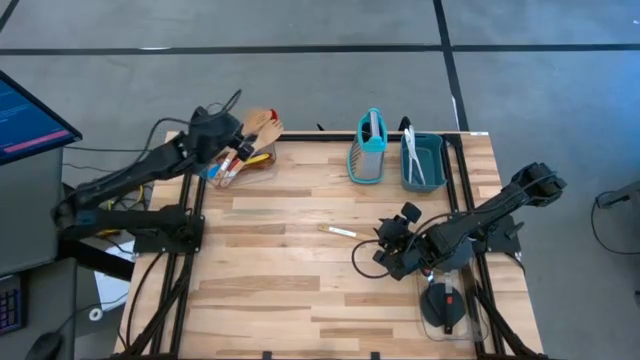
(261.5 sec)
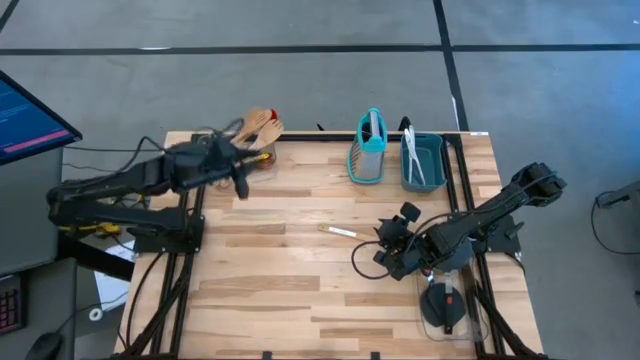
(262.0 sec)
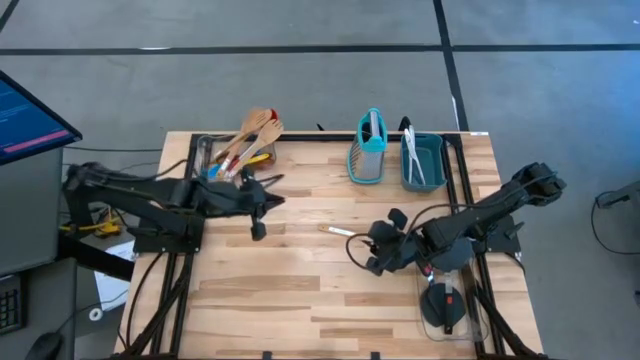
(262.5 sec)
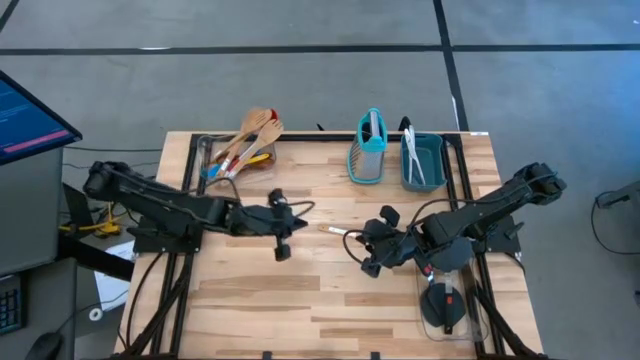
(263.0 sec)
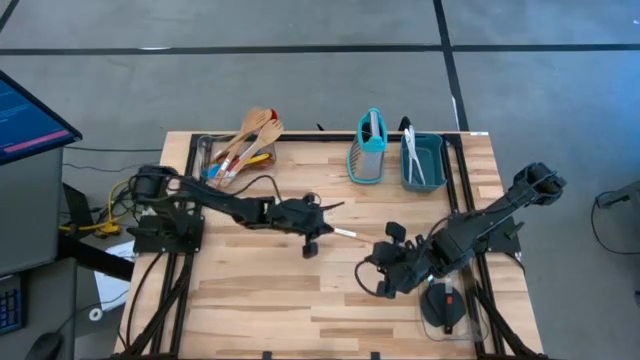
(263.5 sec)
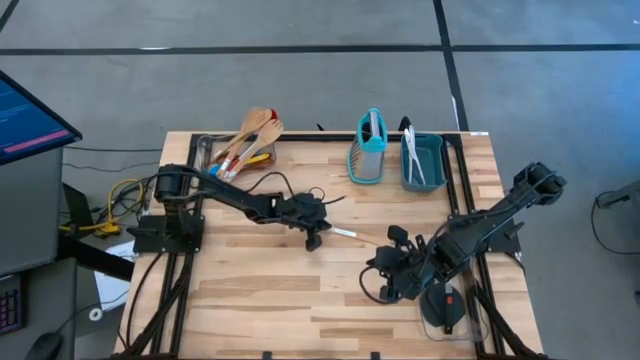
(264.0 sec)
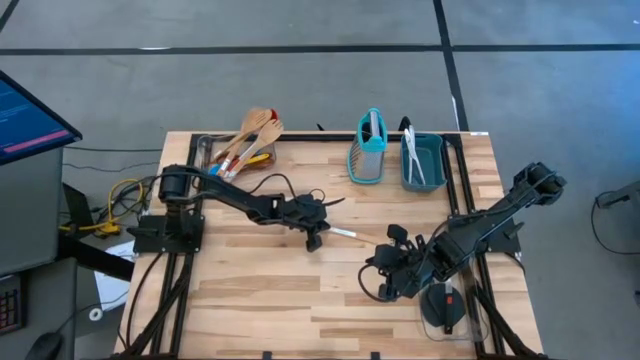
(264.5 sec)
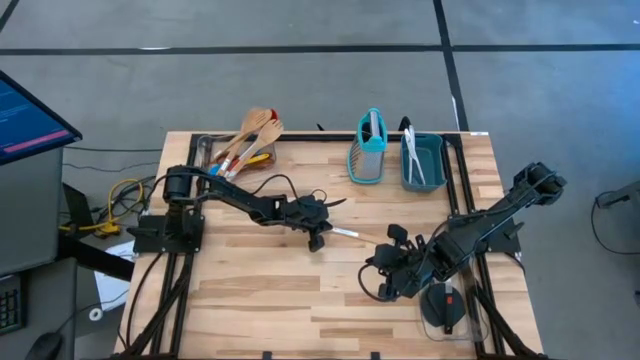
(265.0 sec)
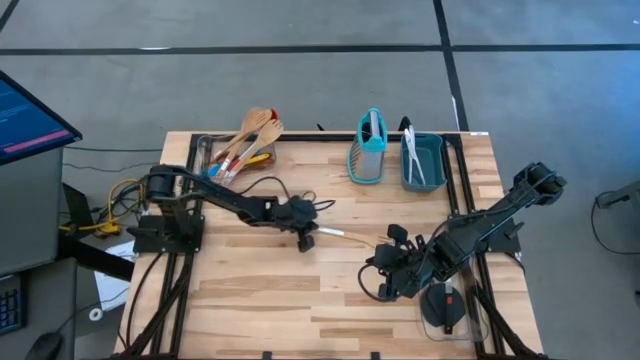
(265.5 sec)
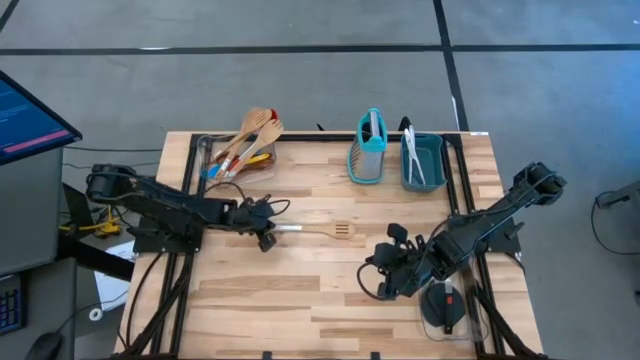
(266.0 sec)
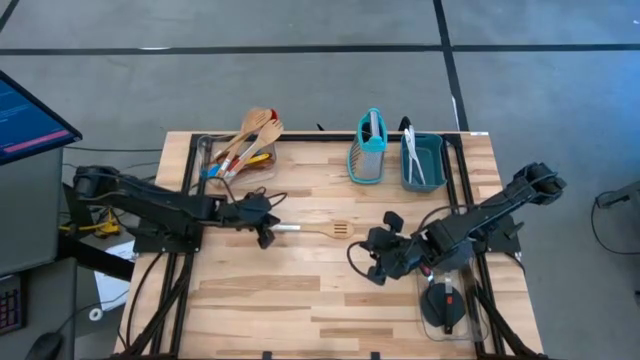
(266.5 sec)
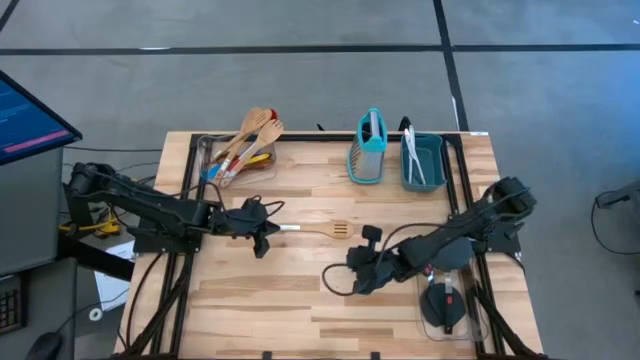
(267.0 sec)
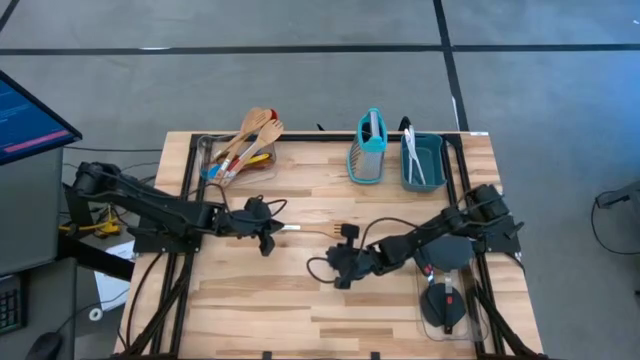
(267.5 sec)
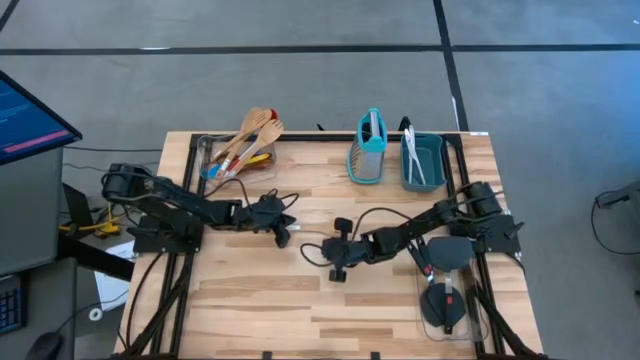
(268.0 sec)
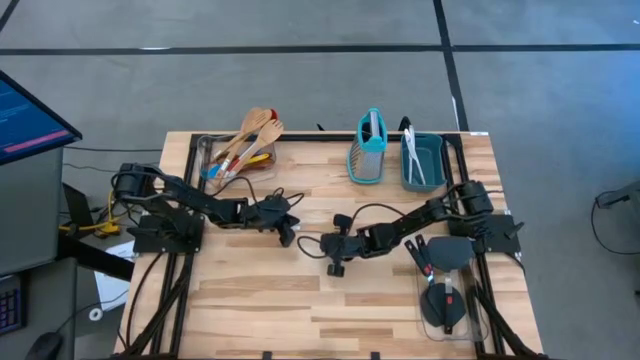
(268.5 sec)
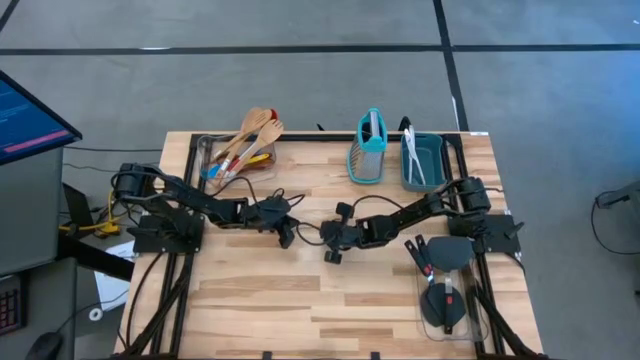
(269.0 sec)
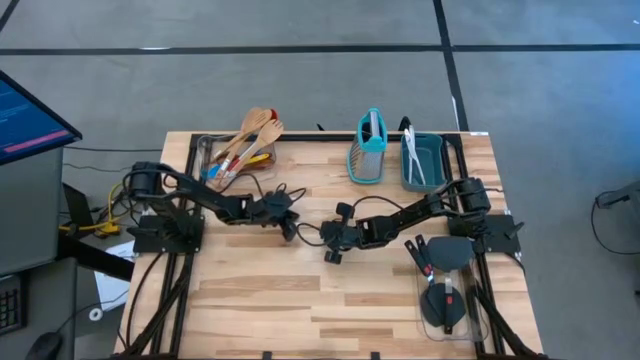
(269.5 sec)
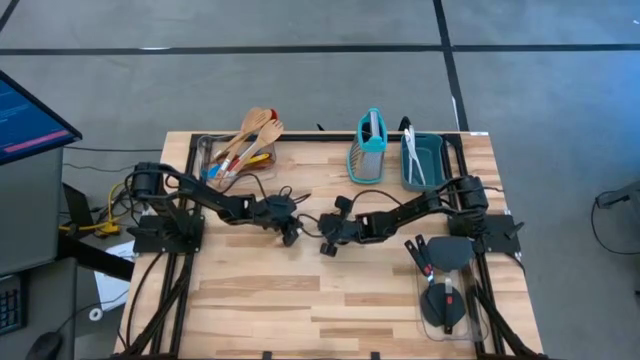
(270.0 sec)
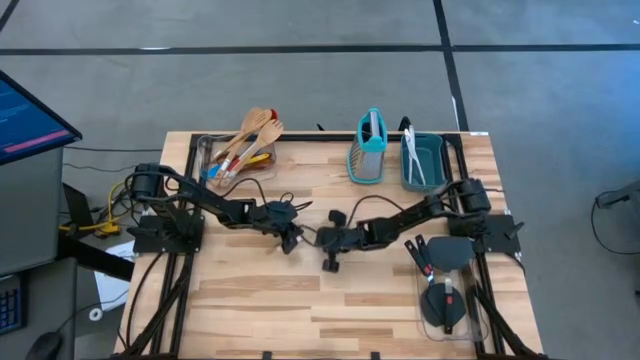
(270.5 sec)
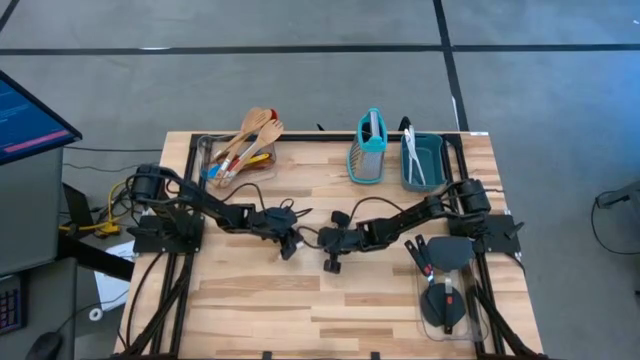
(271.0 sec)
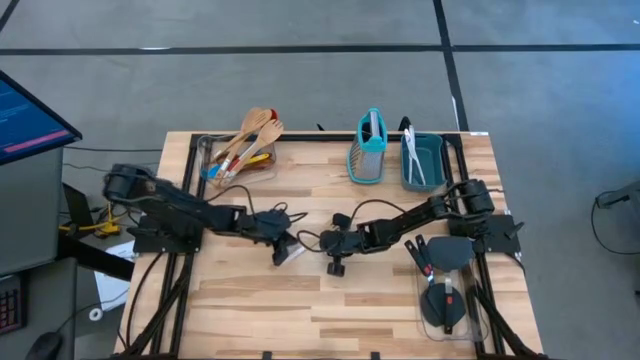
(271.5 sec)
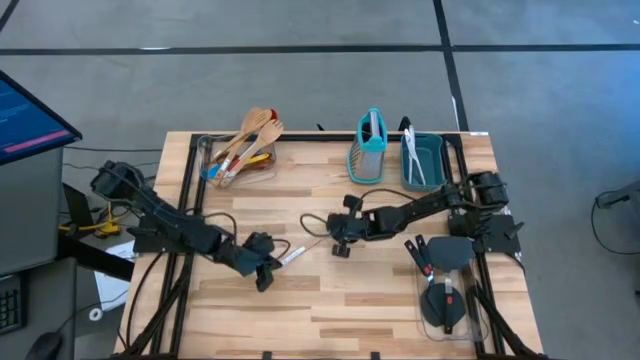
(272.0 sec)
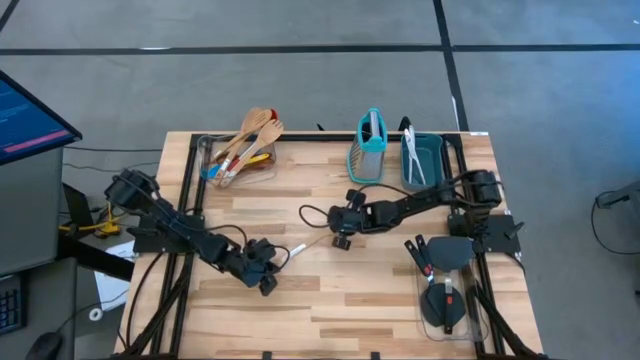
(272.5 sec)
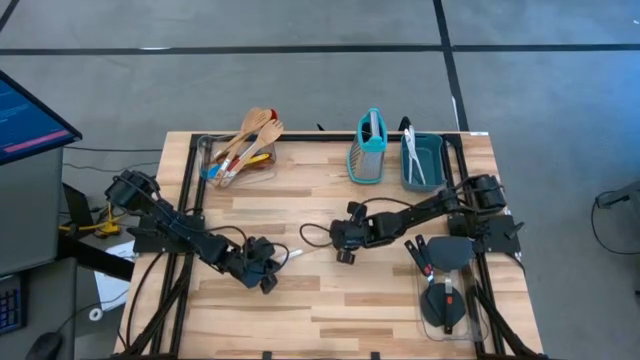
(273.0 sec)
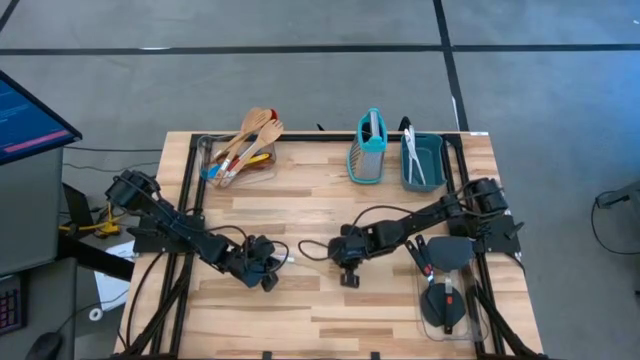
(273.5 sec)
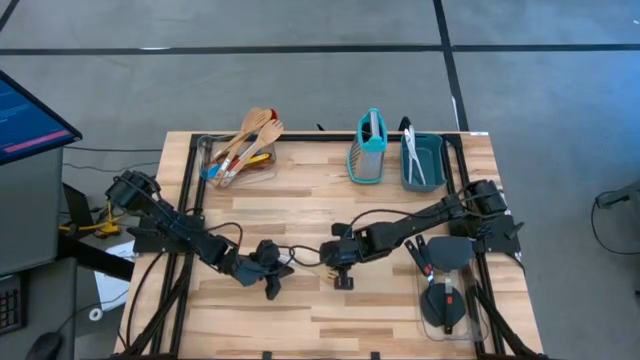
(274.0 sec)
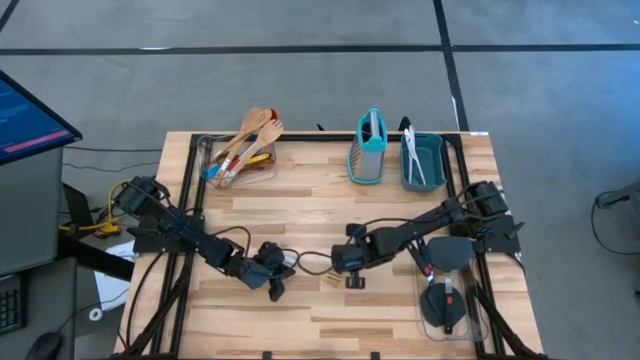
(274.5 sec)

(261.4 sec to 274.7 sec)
Task: Pick & Place Kitchen Items
Put the wooden slotted spoon into the left transparent bin

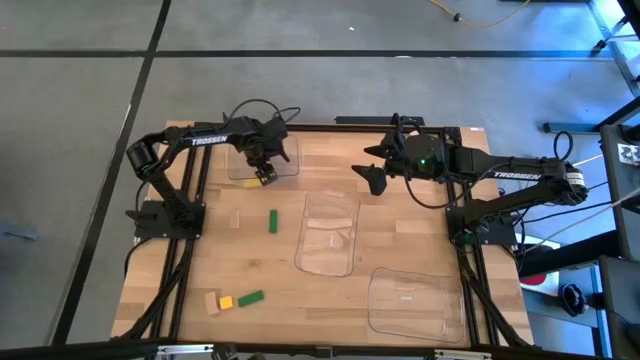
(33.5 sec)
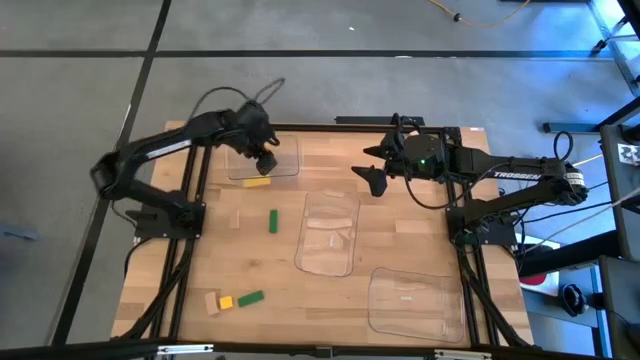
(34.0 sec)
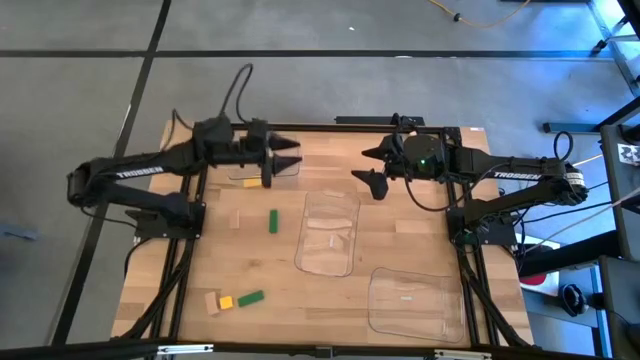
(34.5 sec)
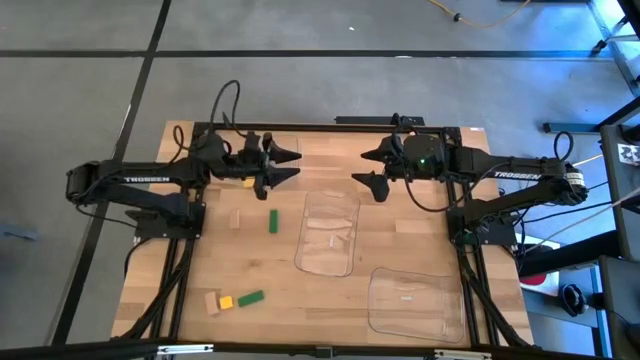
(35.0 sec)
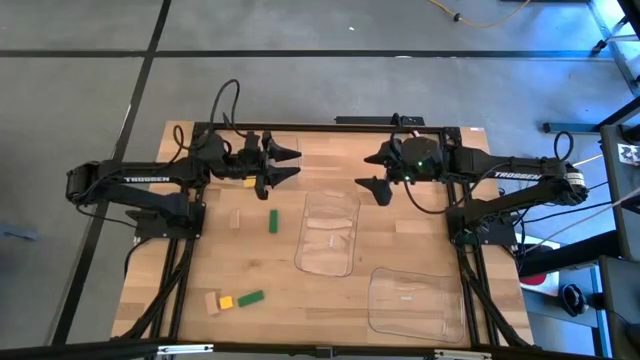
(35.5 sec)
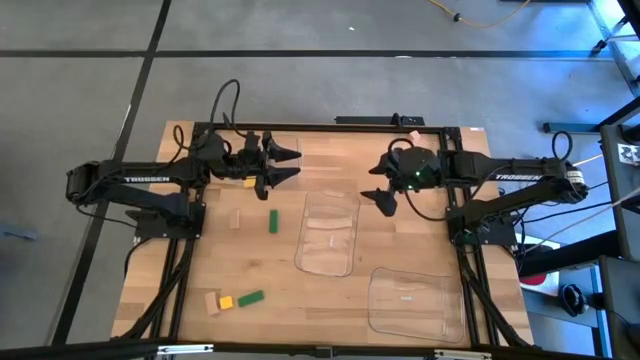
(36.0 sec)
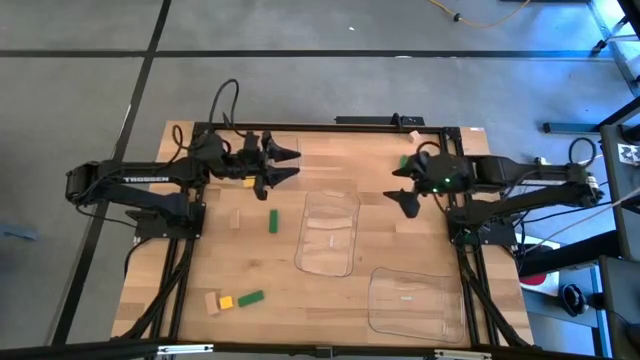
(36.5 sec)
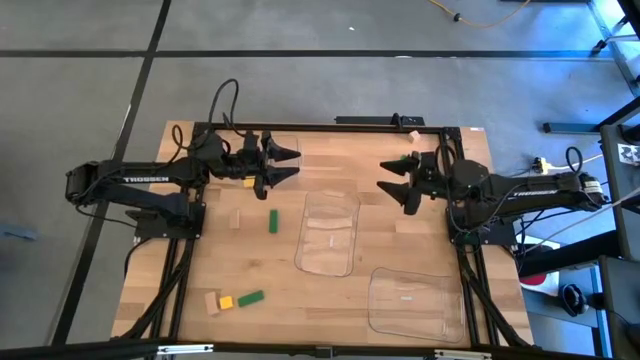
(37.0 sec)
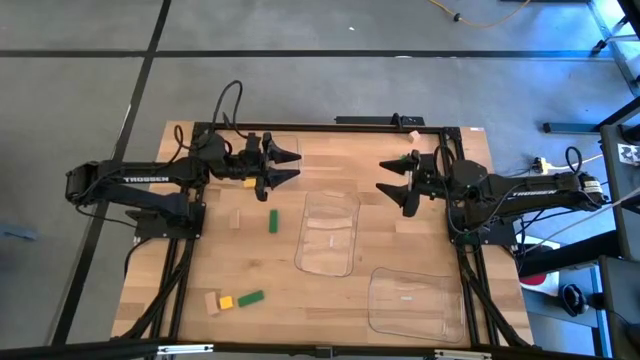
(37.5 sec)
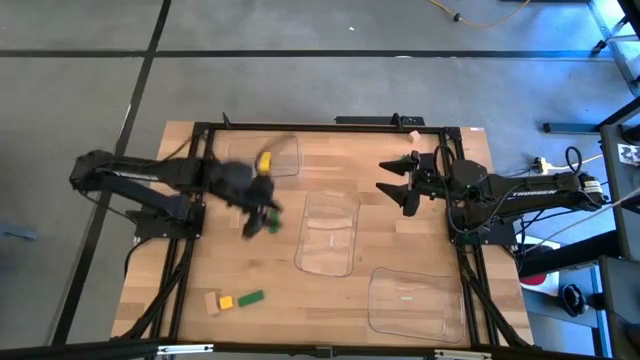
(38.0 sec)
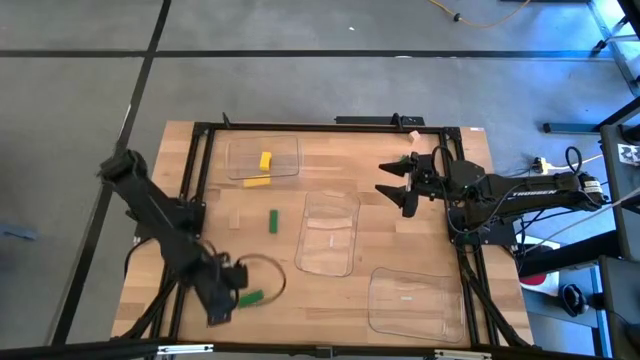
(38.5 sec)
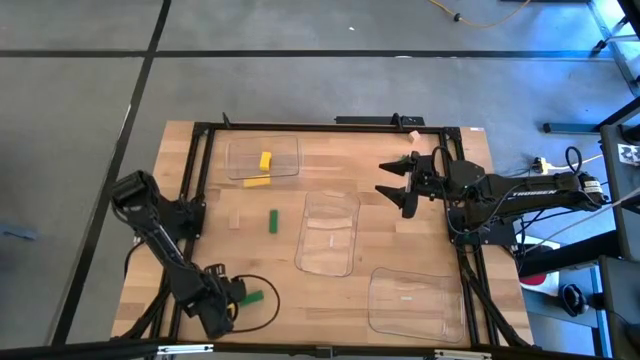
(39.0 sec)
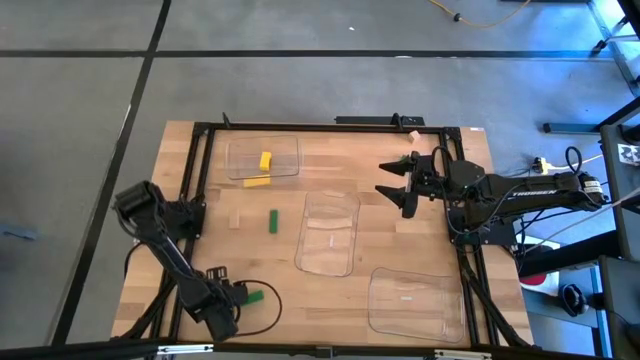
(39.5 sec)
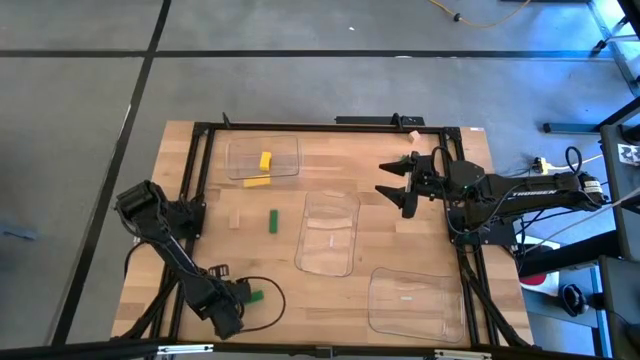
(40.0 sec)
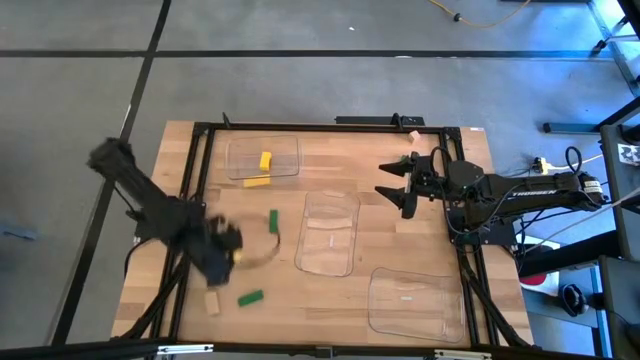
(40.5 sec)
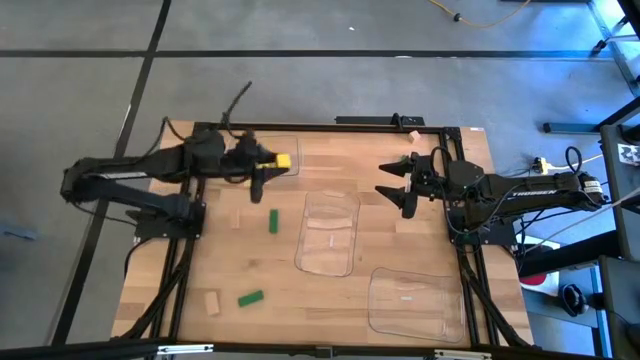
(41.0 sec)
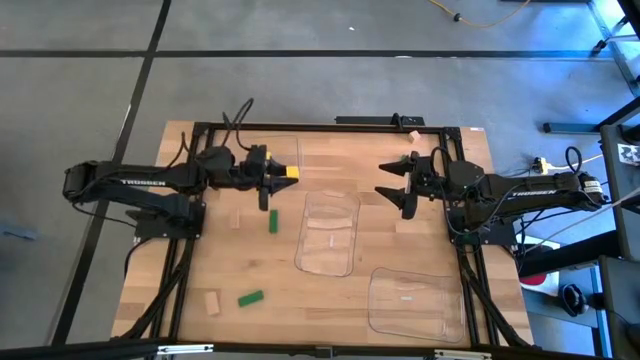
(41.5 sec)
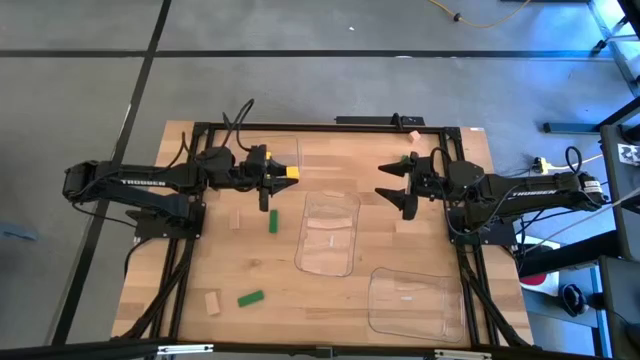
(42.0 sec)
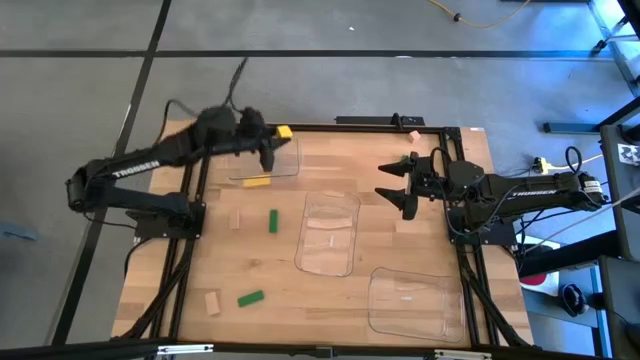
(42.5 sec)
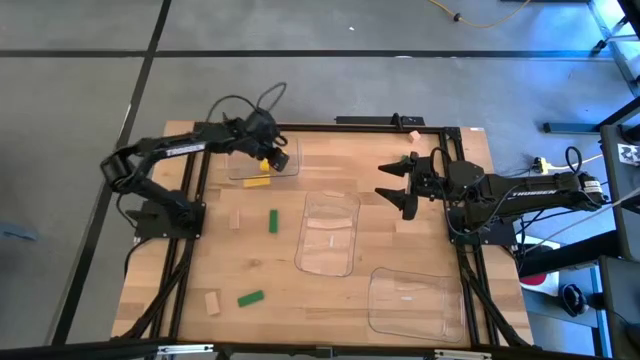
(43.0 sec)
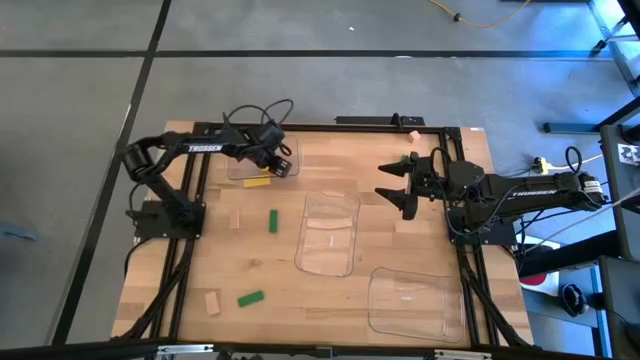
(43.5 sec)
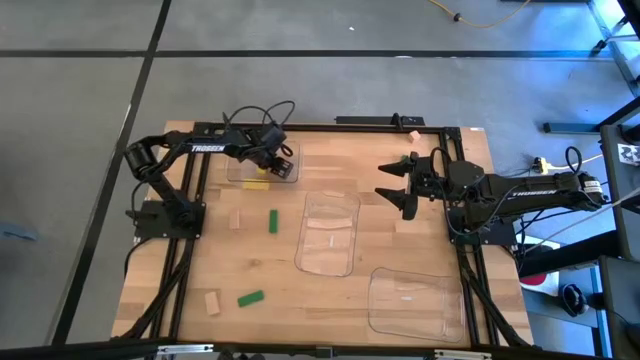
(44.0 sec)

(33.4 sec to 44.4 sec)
Task: Sort & place blocks by color
Put the yellow block into the top transparent bin
